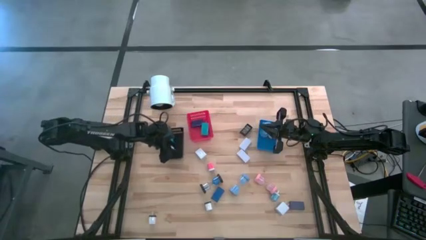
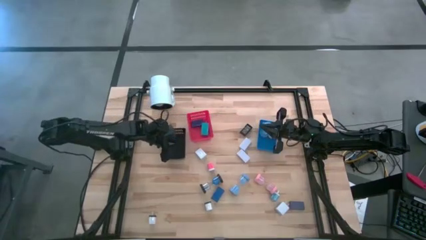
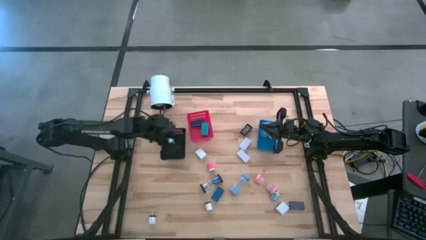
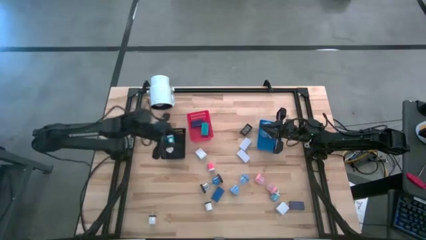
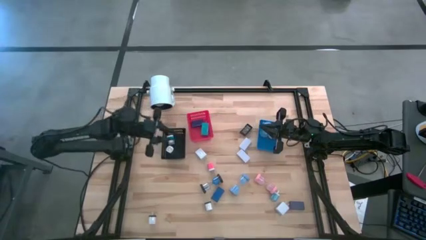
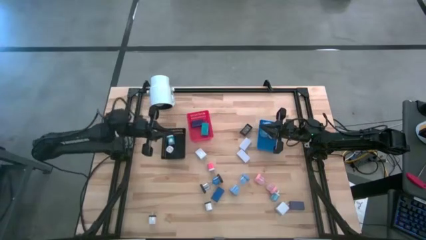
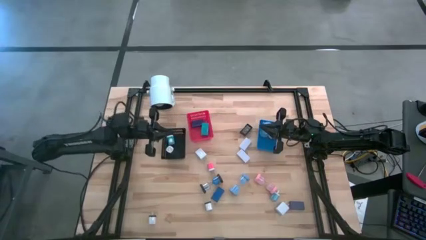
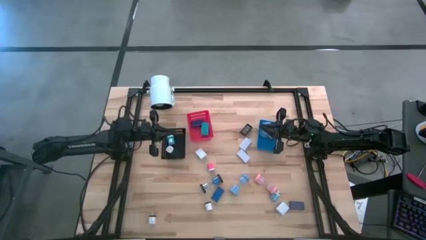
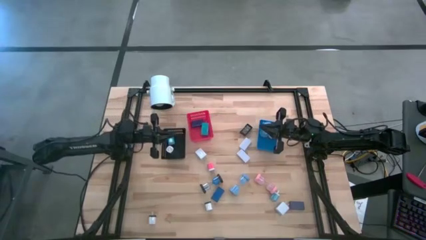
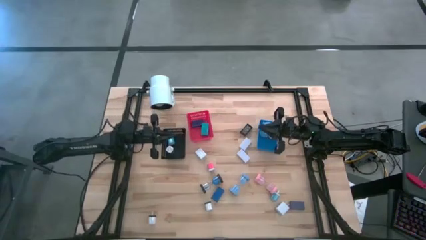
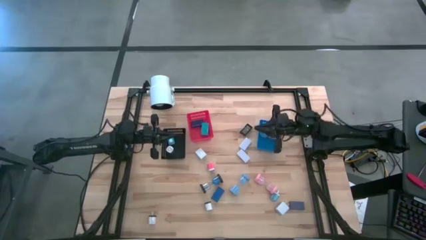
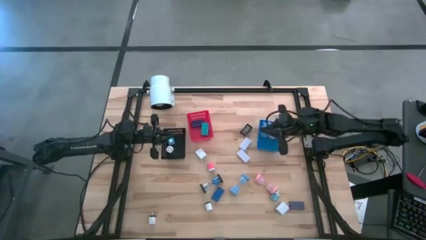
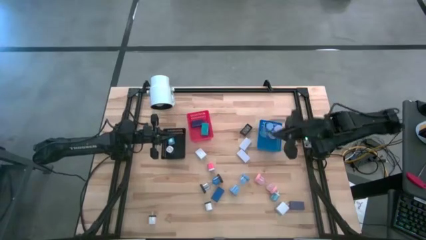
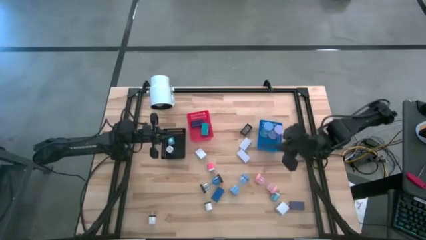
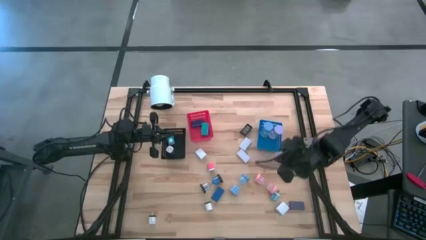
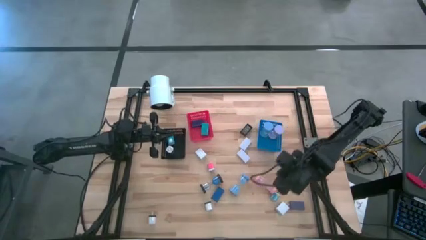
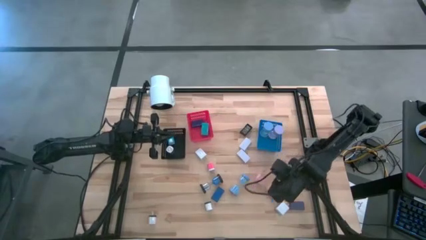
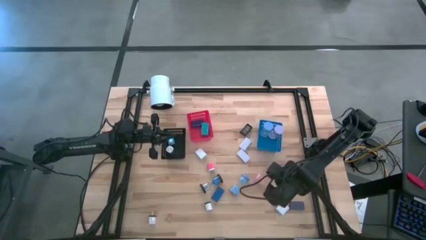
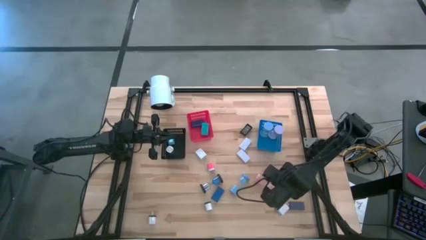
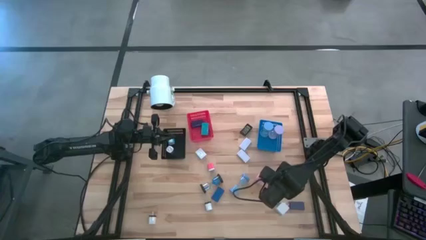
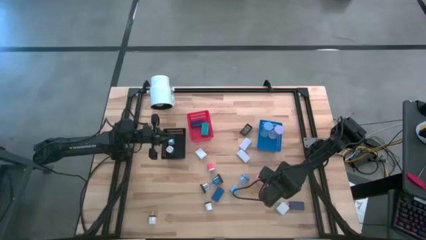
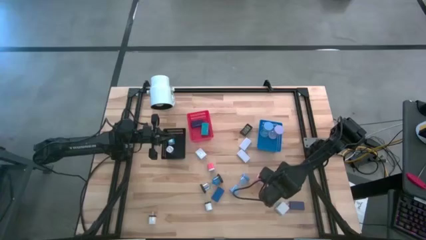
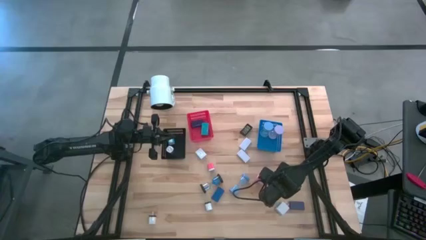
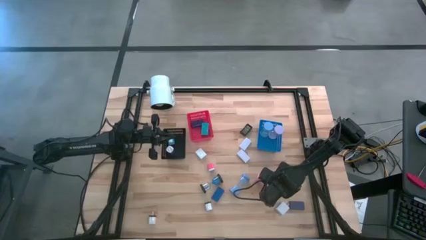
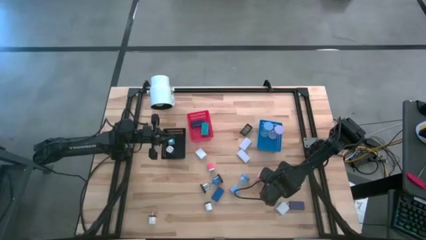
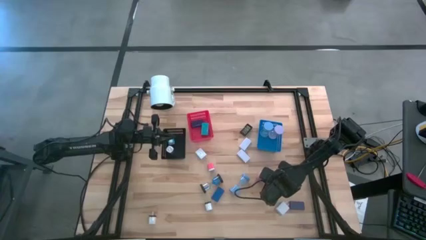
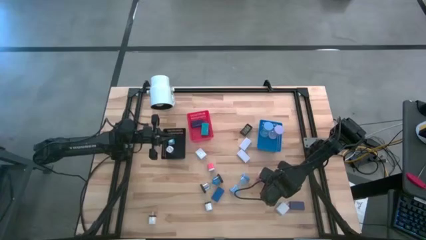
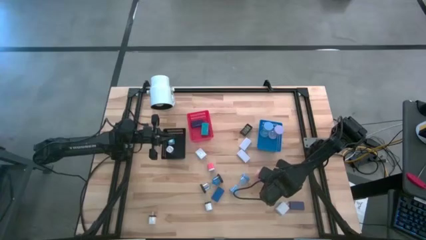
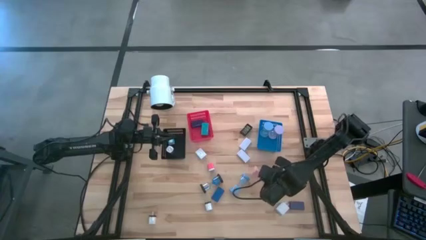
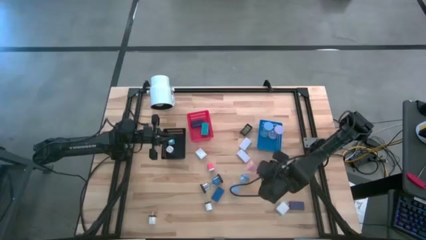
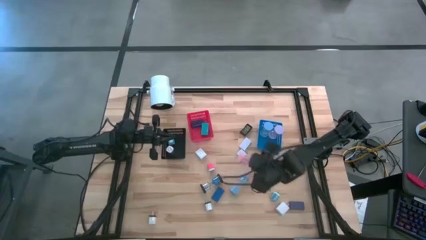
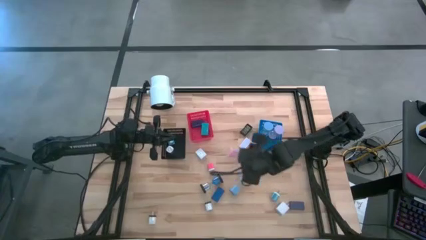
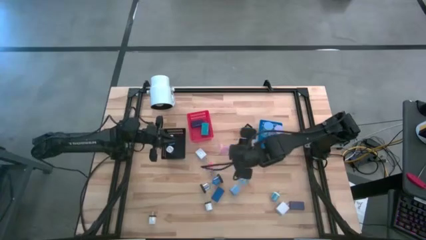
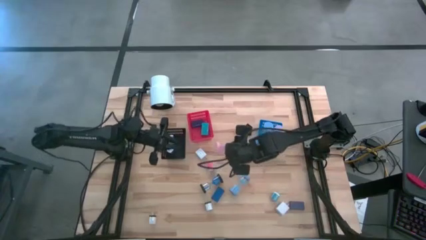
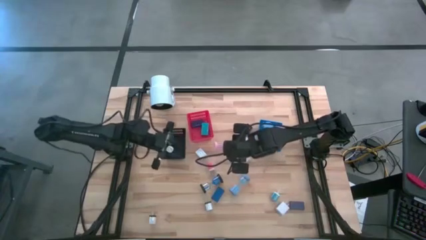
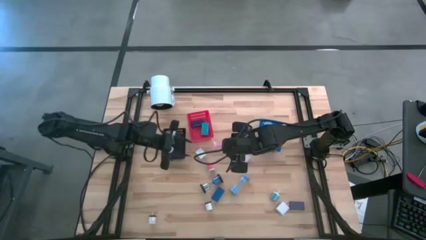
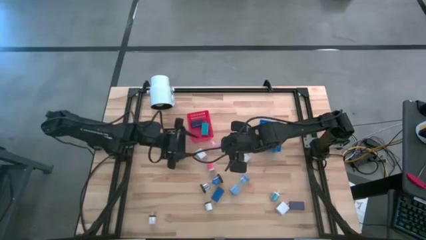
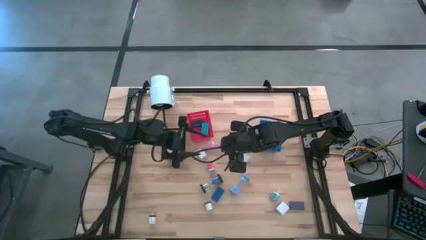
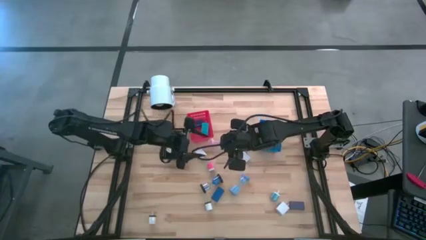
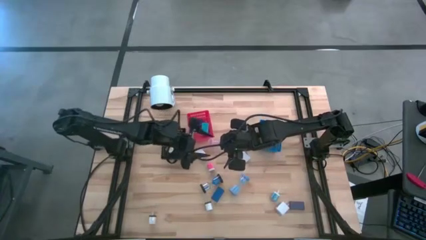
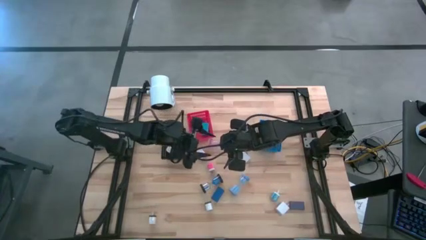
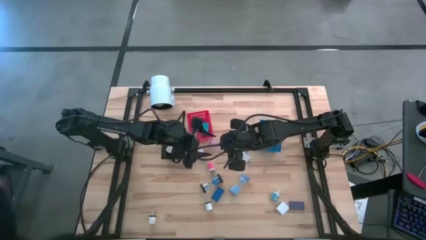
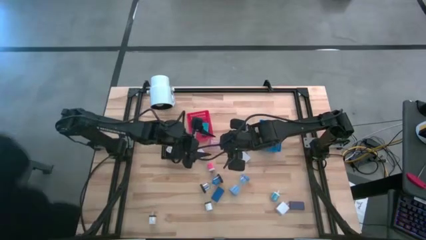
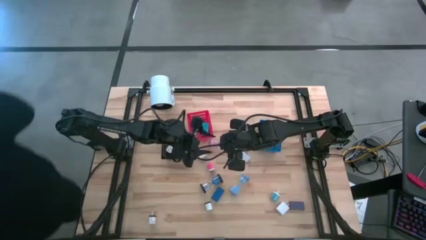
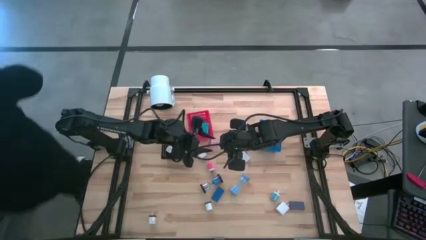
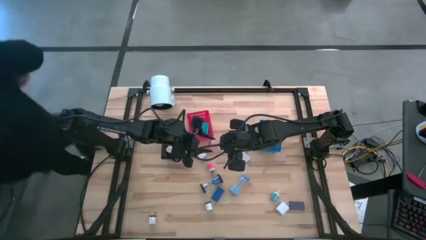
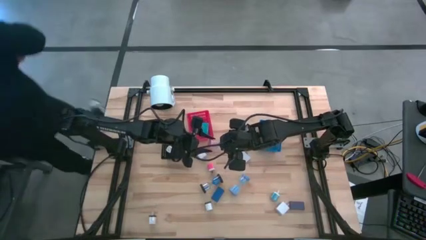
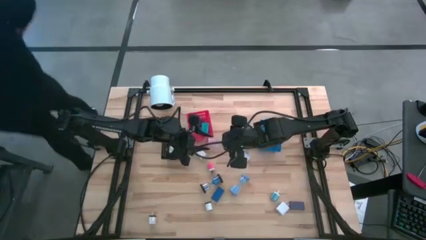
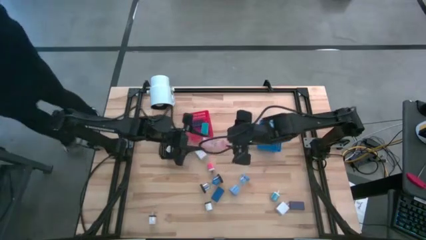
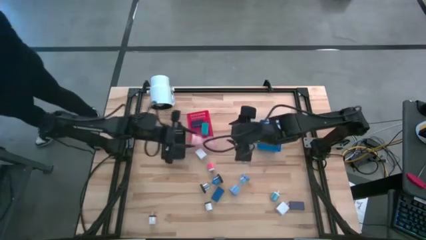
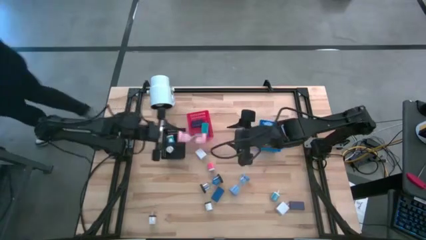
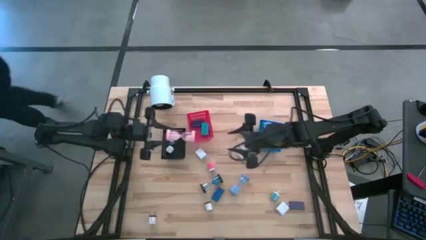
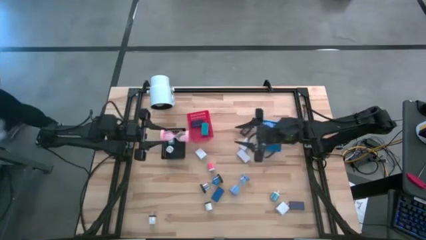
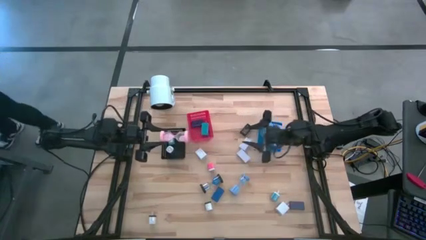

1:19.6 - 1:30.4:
Task: Pick & Place Office items
Put the pink hourglass into the blue bin

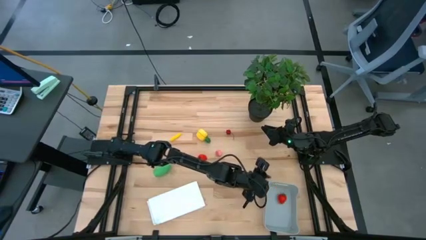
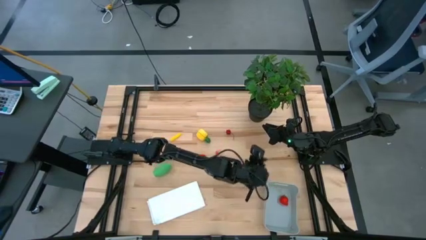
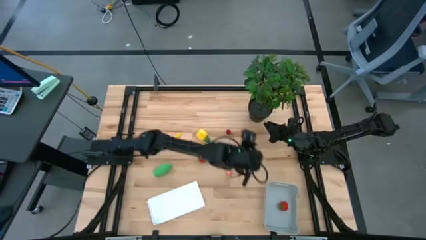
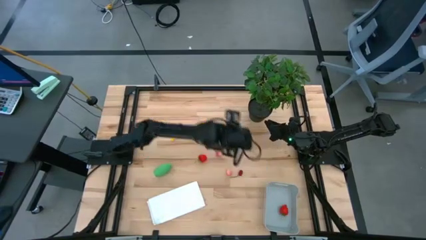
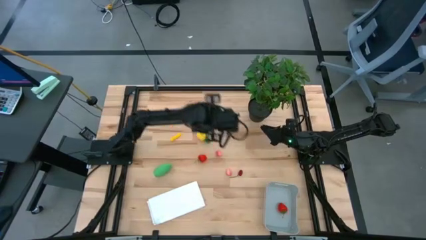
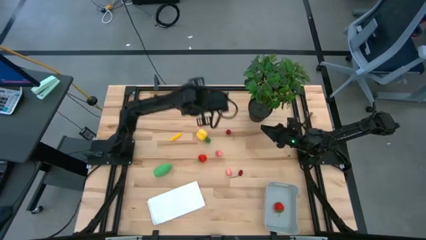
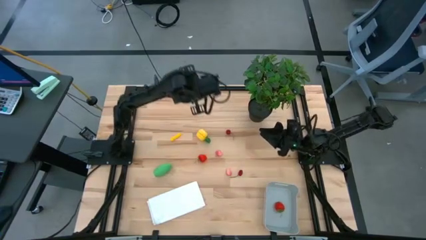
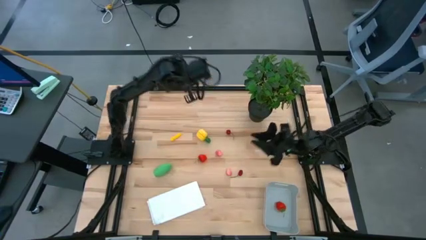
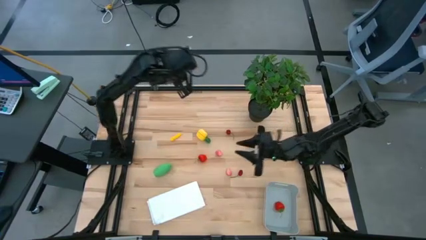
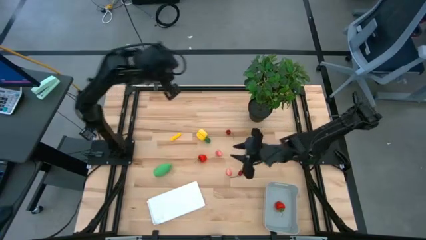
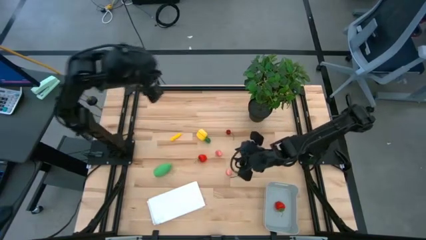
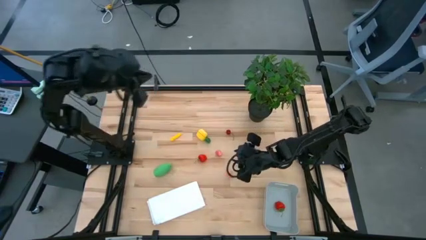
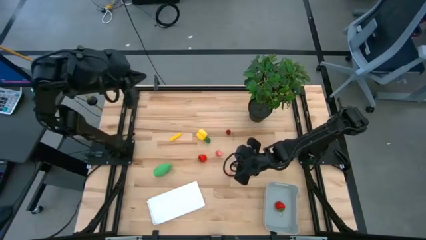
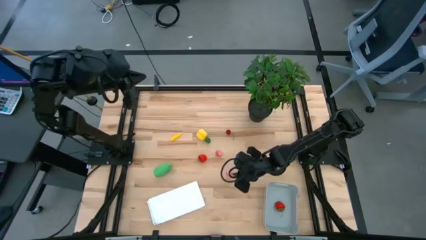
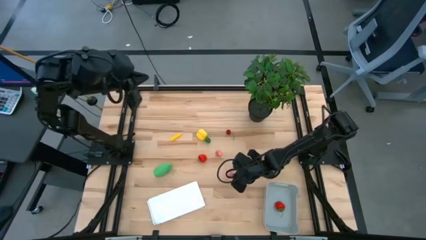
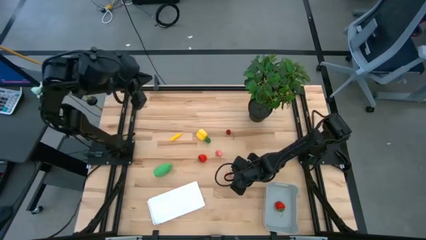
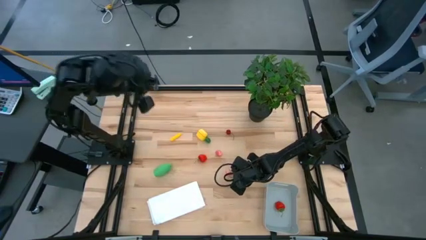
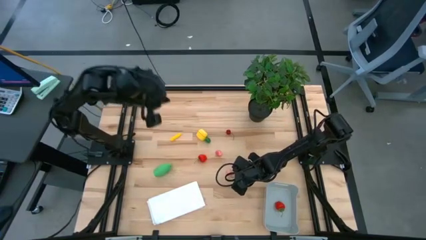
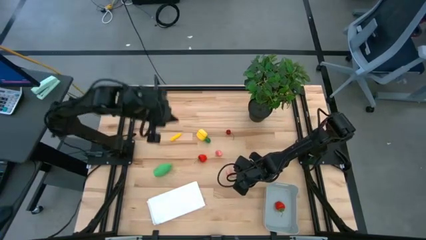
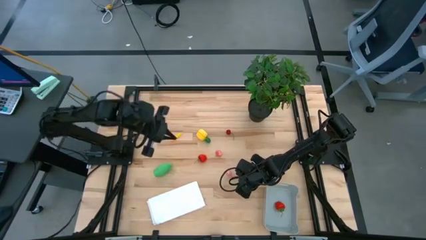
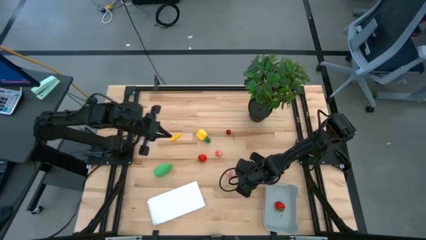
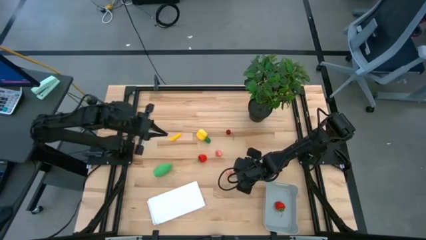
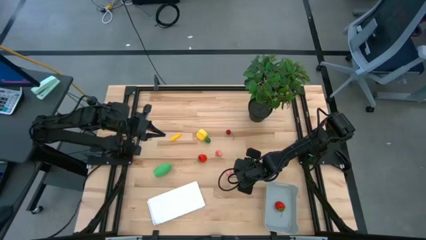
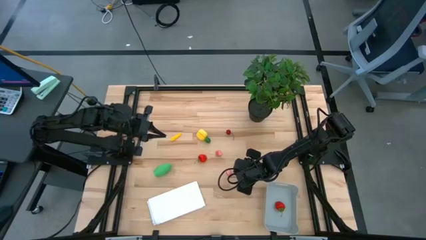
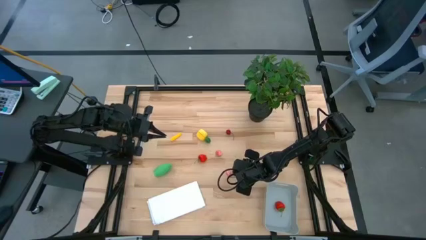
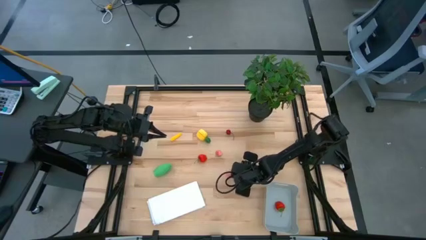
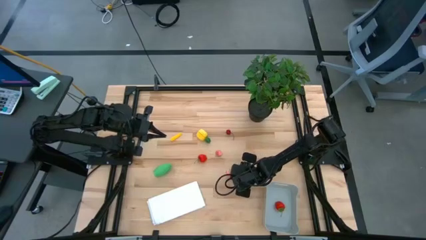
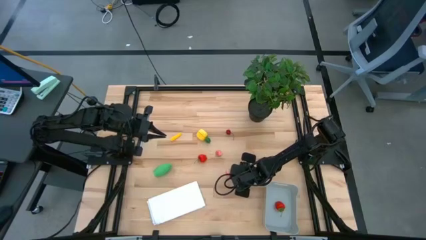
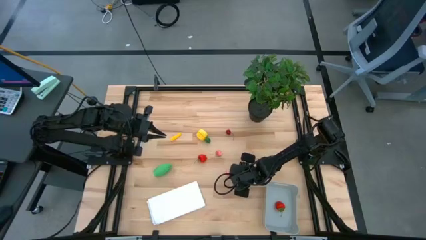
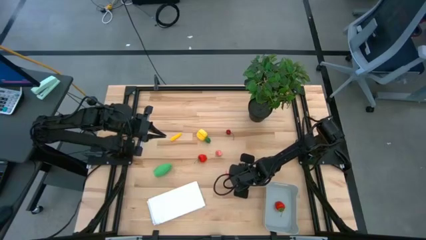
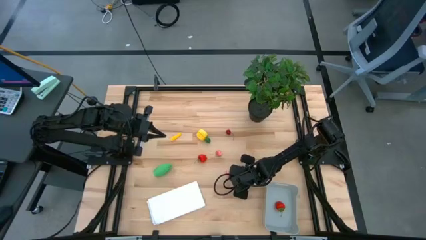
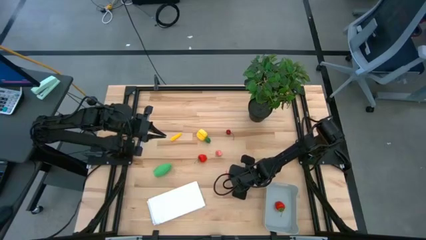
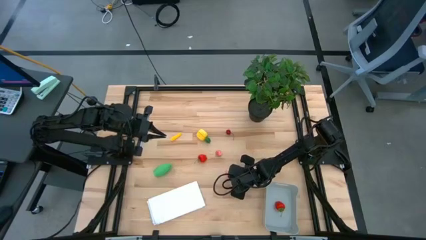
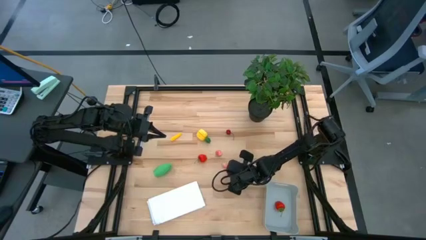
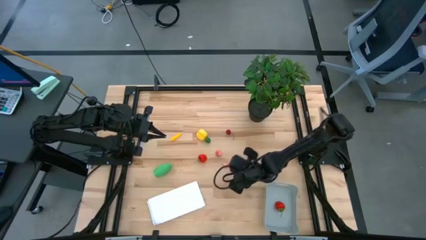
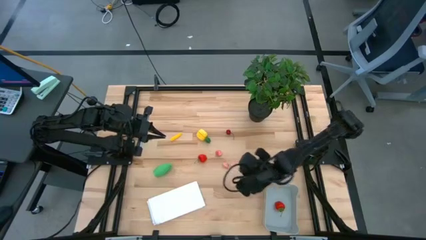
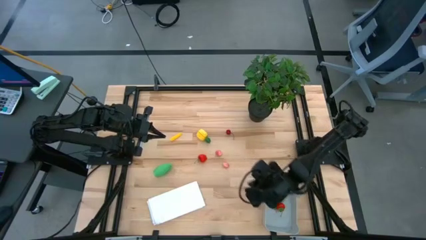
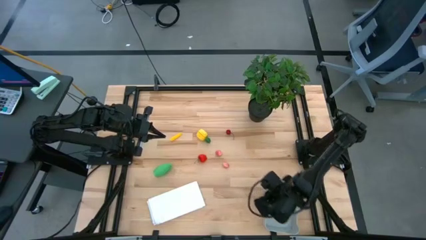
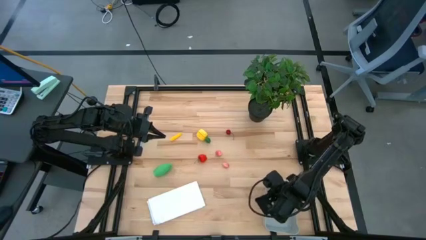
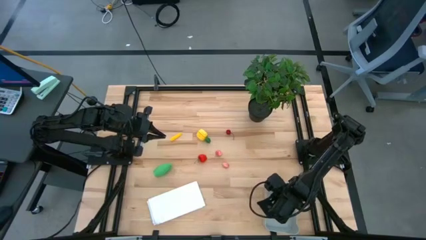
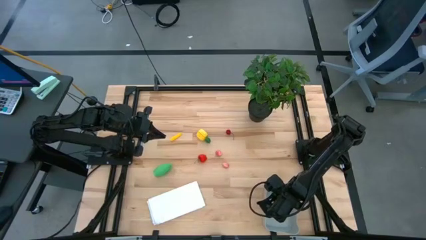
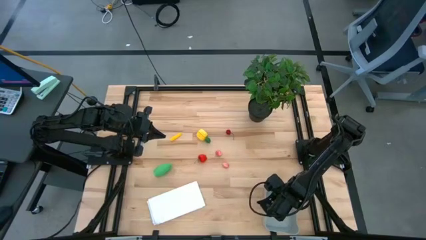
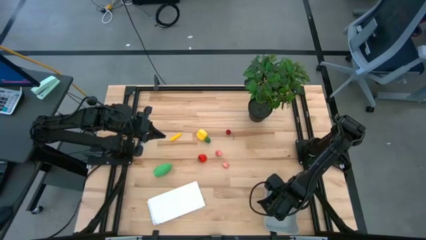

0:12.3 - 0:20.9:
Task: Pick and placing Produce into tupperware
Put the bottom red cherry into the gray bin
